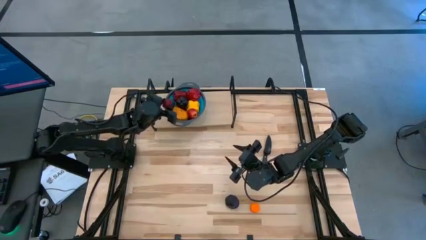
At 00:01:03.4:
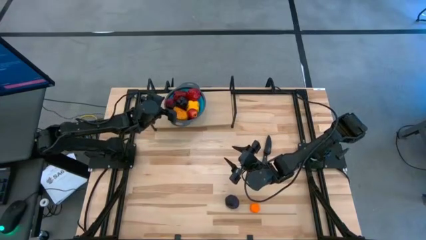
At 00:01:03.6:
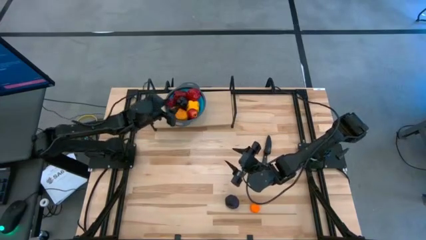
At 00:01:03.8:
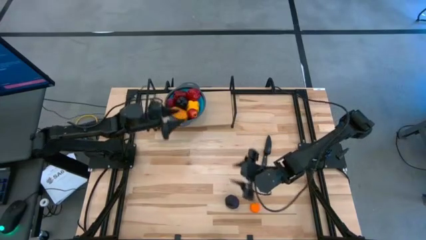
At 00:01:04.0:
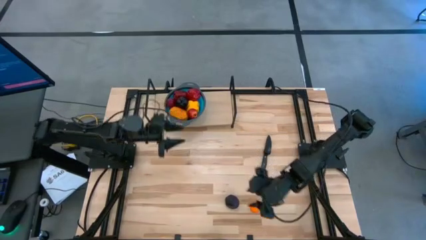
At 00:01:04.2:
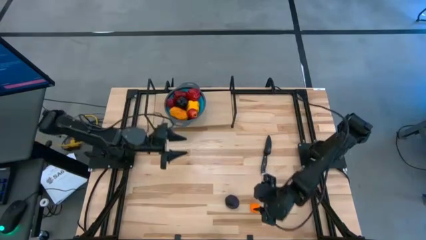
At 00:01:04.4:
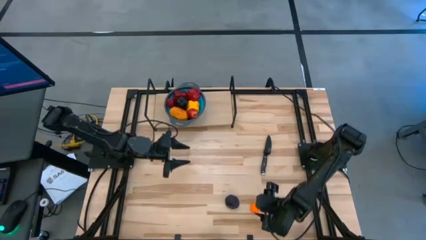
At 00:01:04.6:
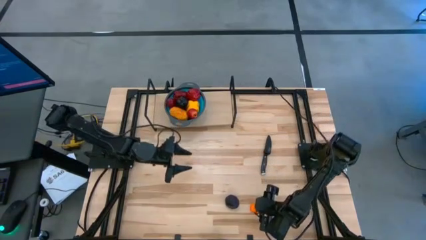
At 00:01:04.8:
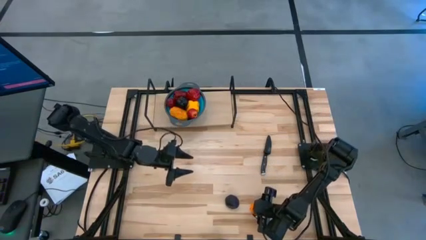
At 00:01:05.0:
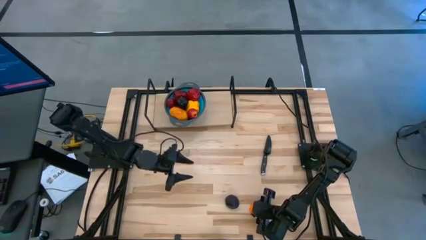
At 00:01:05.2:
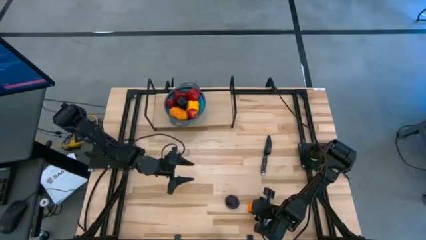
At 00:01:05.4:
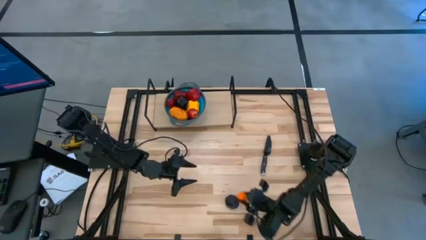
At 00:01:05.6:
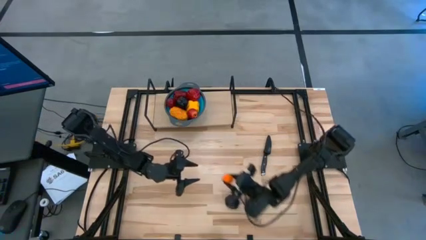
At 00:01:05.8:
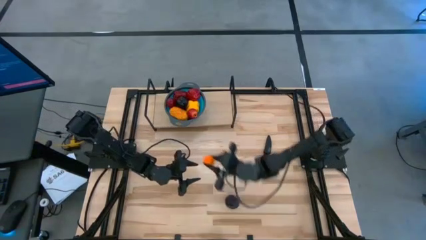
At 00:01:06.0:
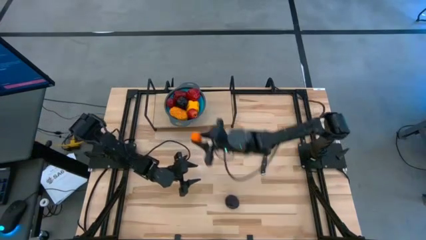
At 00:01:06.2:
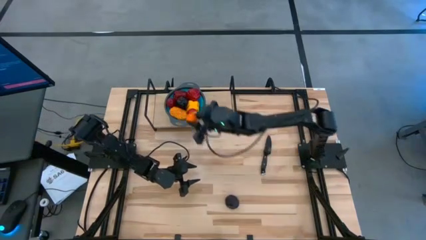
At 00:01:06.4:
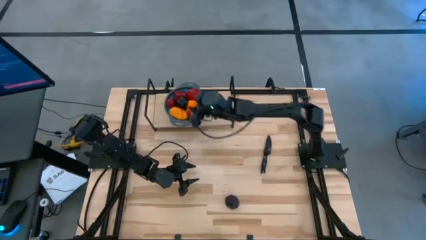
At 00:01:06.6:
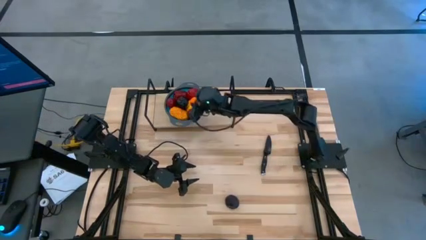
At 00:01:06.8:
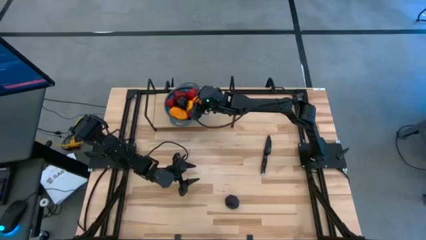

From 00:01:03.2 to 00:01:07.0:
Task: Pick & Place Fruit
Put the orange into the blue strainer bowl on the shelf

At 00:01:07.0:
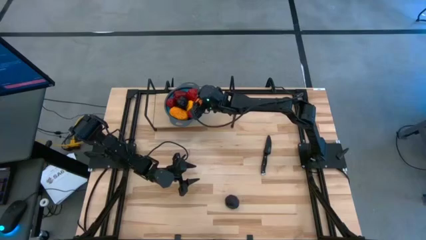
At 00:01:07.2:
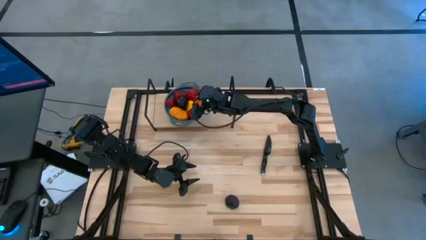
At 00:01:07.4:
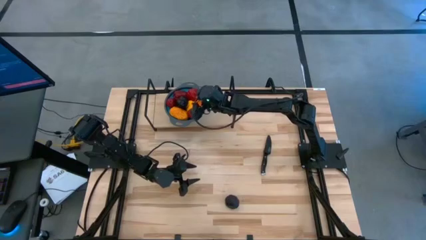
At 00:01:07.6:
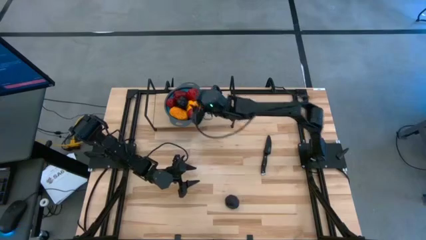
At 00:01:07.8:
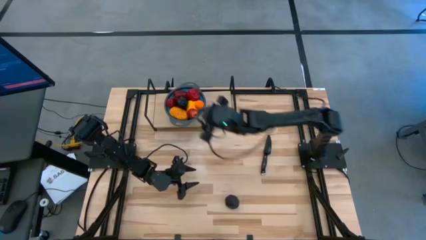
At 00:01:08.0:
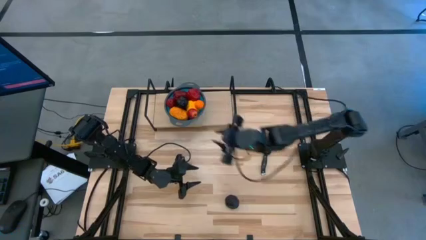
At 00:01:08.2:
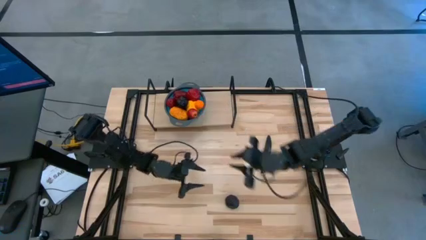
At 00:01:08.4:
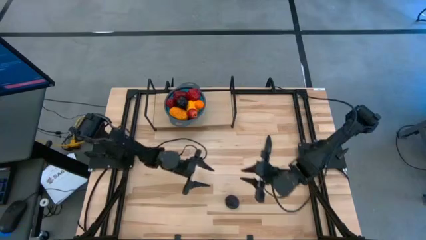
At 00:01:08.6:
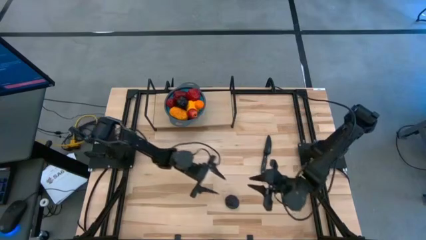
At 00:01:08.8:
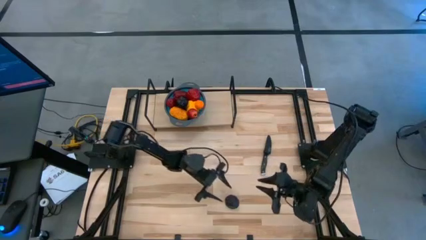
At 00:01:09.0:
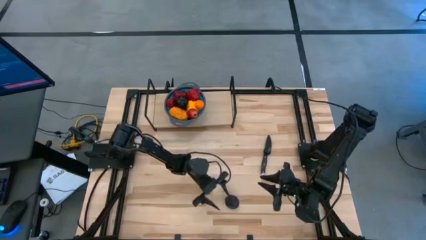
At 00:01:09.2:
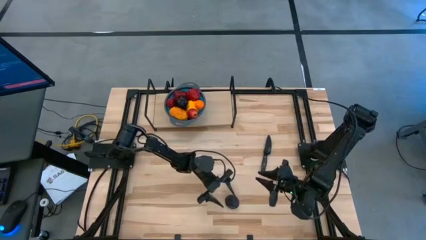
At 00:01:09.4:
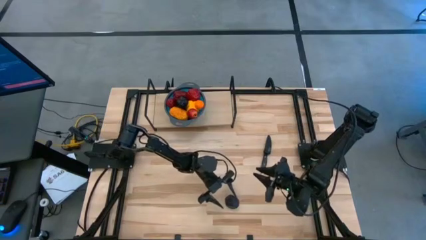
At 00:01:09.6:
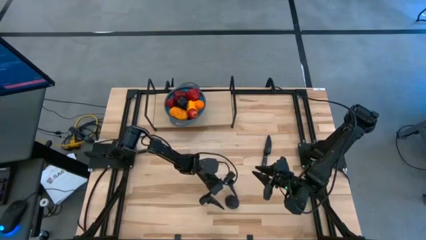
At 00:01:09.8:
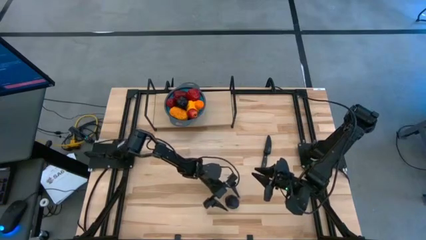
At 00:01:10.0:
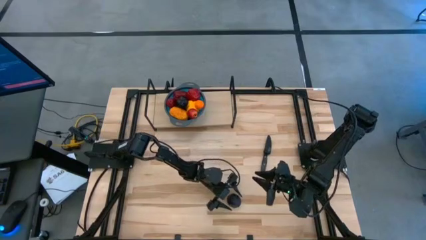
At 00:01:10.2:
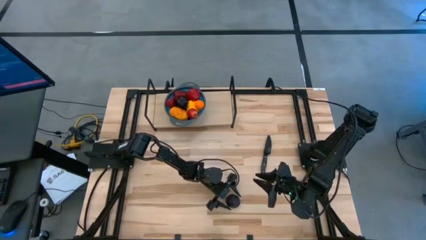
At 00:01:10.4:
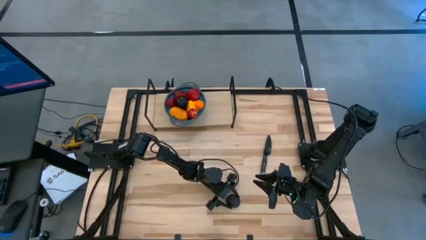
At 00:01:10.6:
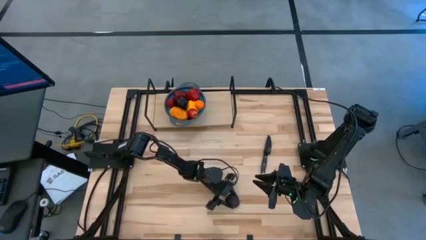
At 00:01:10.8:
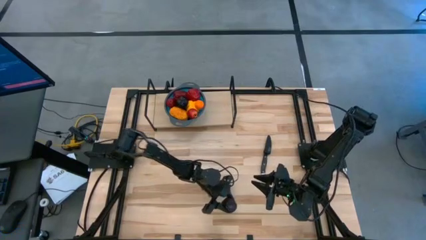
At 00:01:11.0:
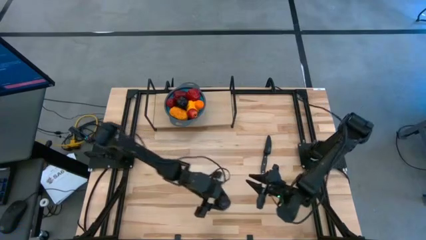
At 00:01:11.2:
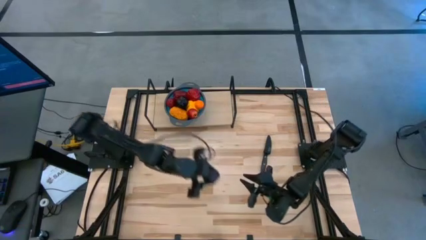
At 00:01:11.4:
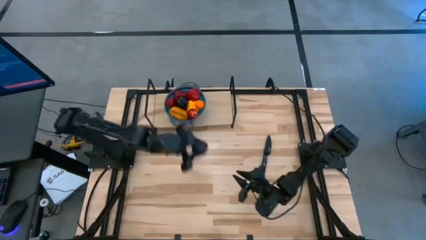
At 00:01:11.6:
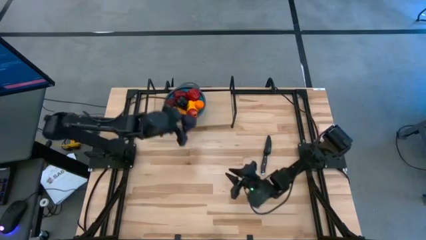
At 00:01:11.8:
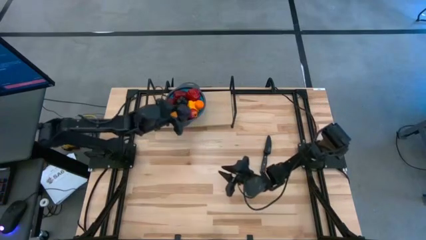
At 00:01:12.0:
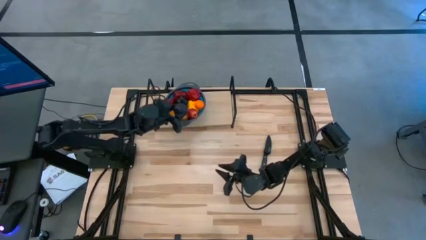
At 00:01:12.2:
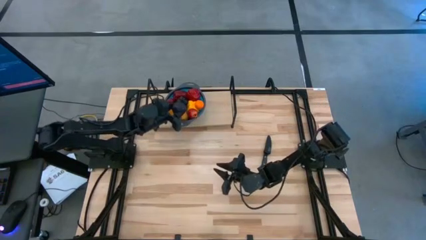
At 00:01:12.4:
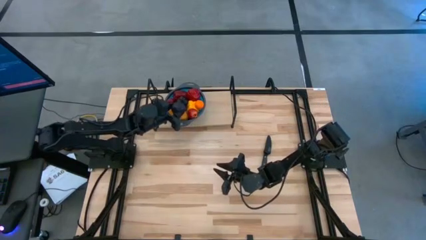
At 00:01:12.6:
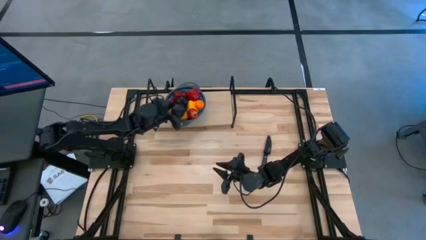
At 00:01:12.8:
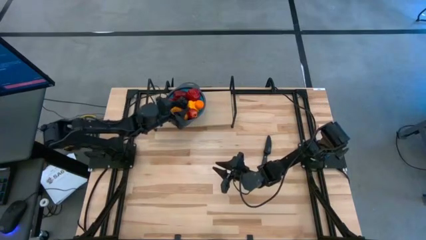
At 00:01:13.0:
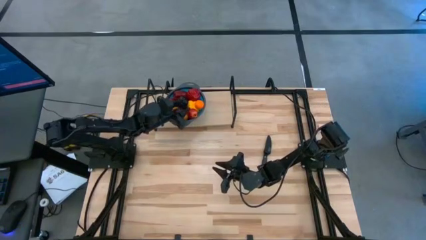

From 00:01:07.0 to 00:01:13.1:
Put the plum into the blue strainer bowl on the shelf

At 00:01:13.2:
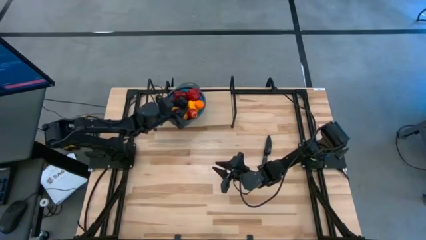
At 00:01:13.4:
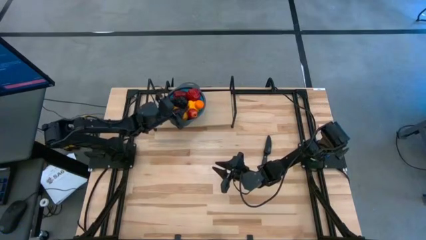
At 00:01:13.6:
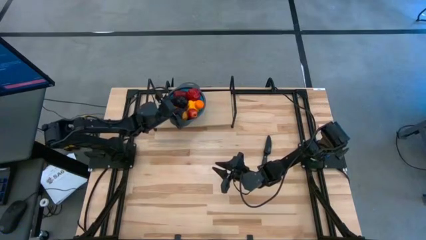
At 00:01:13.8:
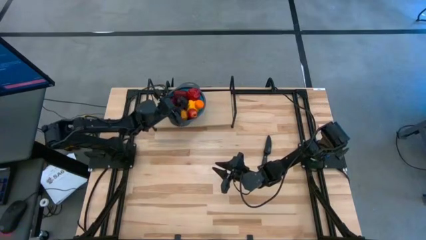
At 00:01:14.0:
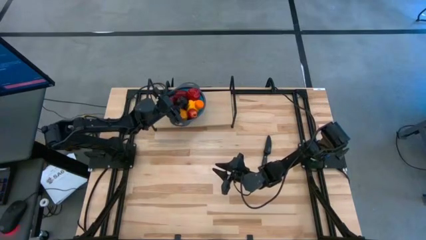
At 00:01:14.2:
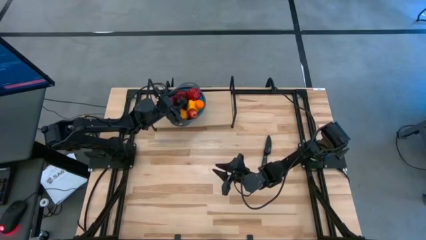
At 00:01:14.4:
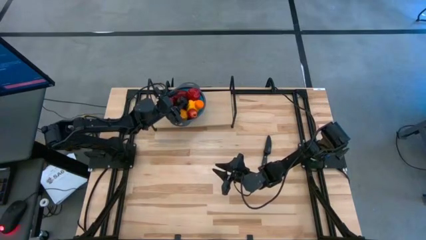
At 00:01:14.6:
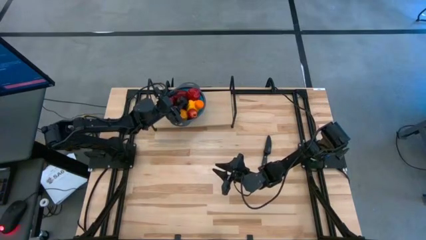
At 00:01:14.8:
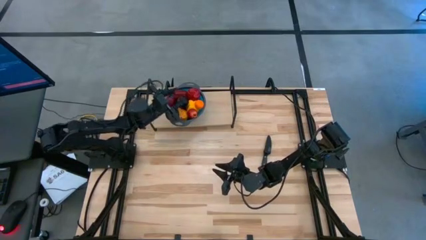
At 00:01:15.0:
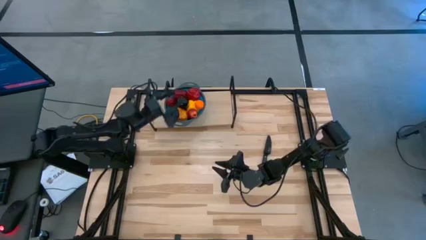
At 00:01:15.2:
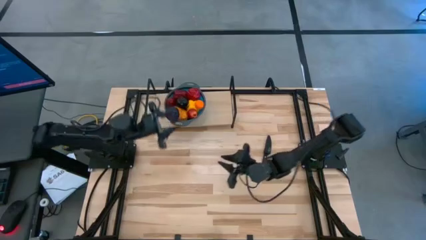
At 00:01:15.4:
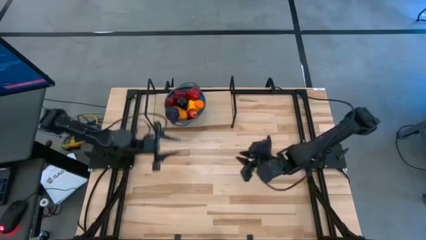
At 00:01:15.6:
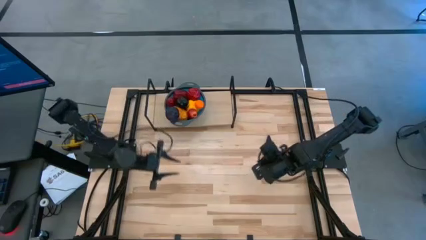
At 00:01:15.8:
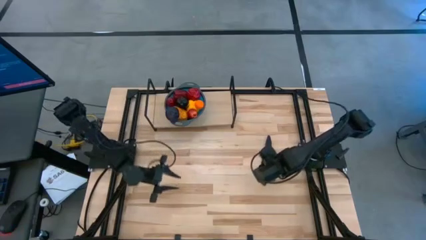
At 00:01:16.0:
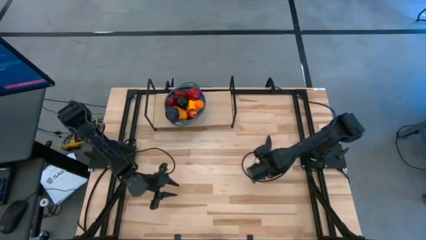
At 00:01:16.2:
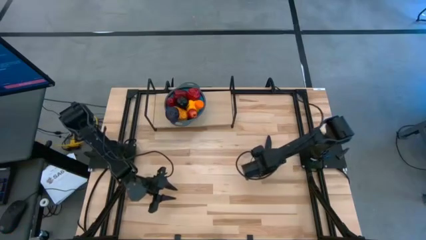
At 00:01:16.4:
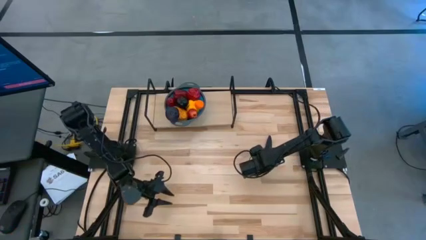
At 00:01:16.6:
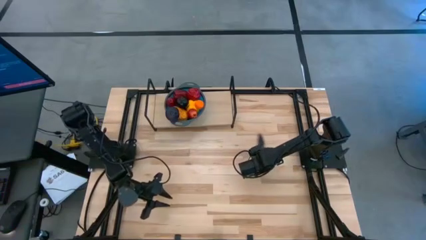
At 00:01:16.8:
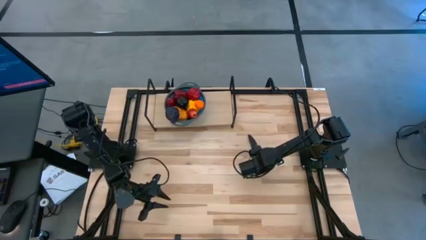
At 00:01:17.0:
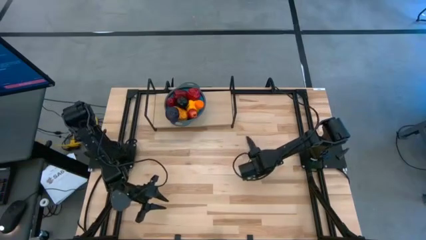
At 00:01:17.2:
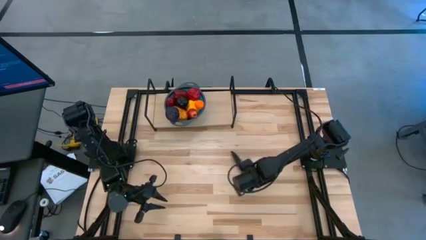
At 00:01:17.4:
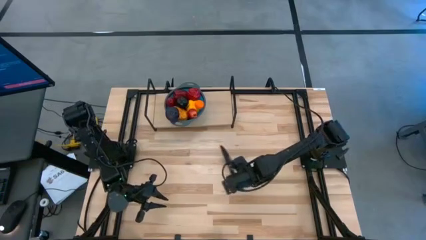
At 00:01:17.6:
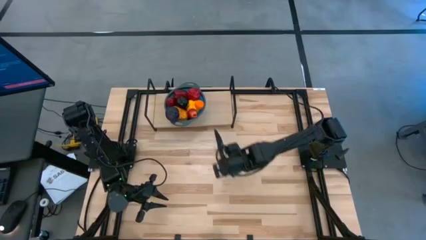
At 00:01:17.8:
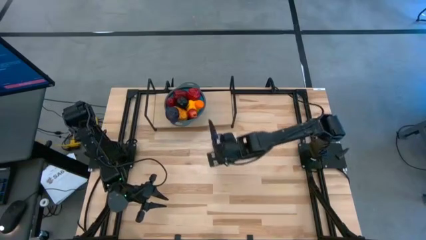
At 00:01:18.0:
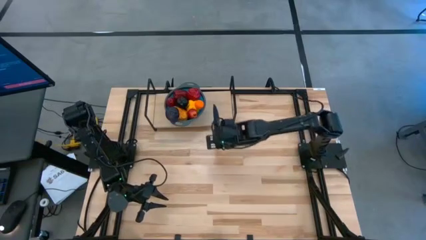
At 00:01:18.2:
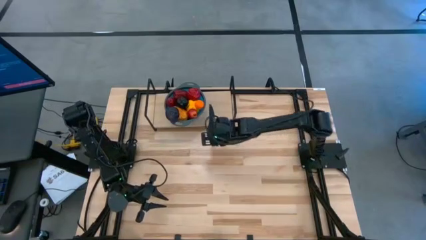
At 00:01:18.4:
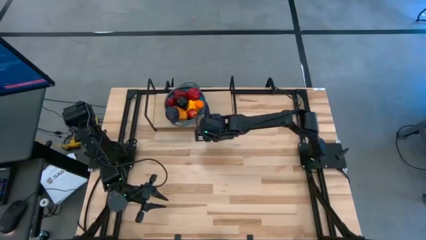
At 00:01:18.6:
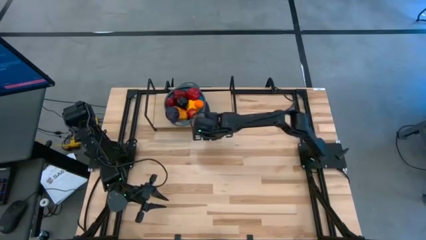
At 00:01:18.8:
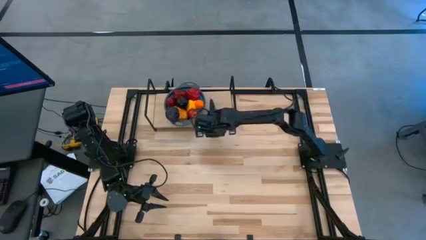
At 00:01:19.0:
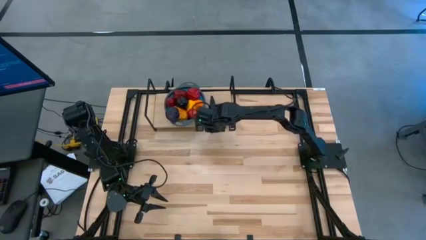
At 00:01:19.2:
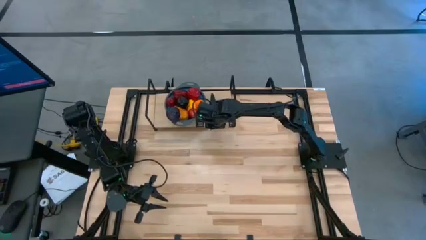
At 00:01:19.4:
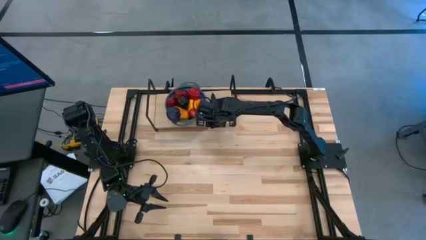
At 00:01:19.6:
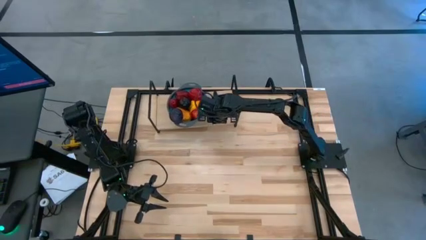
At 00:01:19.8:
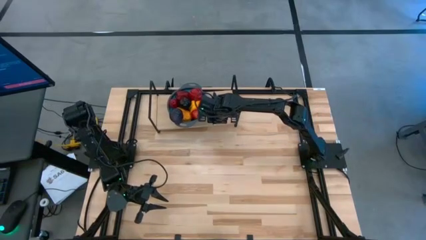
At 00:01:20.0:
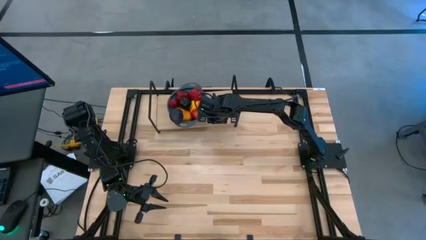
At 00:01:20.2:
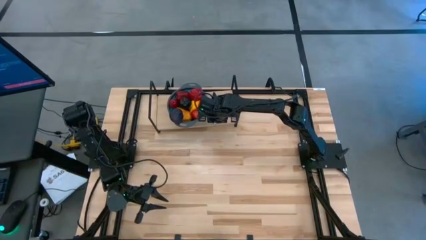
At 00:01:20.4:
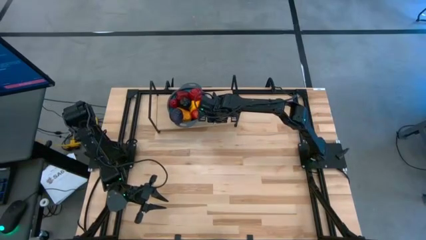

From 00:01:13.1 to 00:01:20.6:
Put the black knife on the shelf
